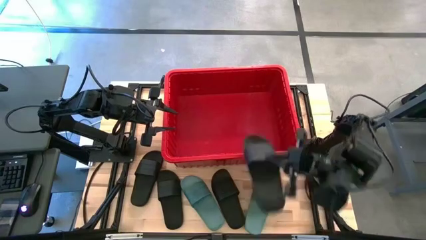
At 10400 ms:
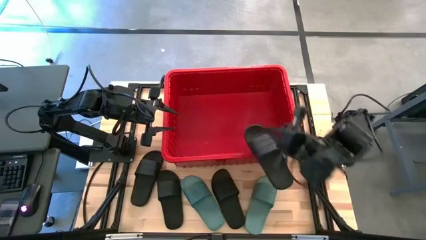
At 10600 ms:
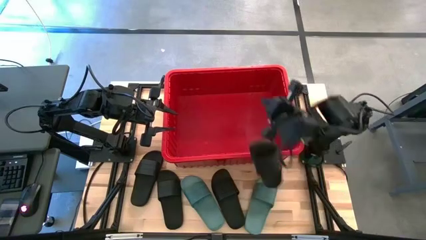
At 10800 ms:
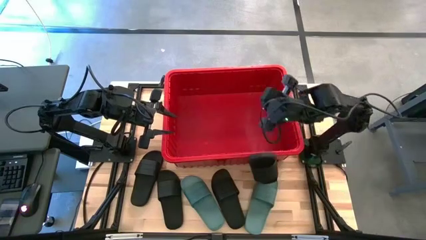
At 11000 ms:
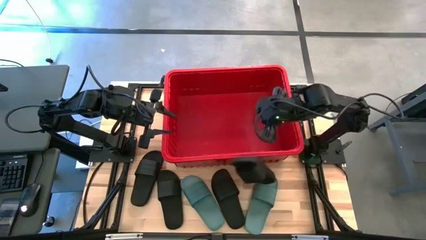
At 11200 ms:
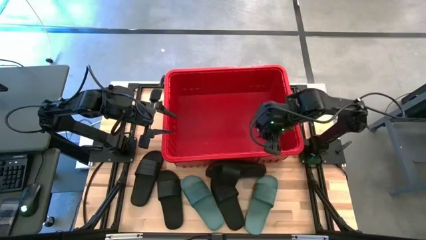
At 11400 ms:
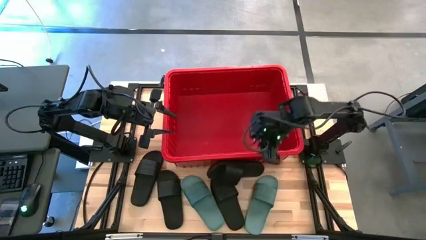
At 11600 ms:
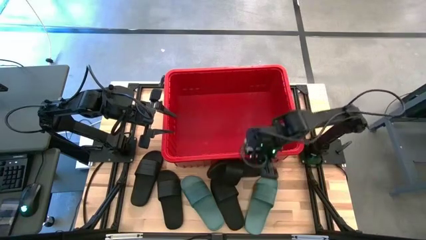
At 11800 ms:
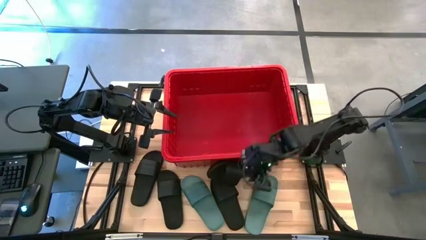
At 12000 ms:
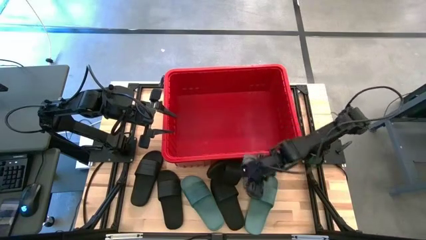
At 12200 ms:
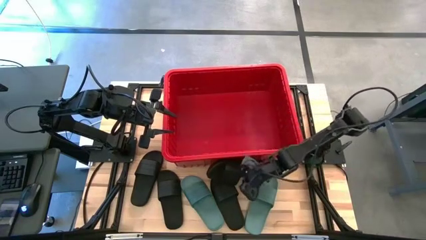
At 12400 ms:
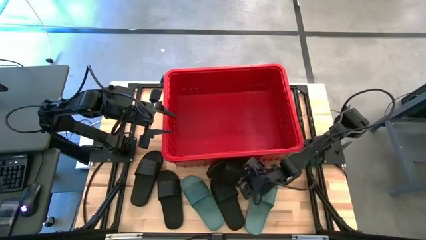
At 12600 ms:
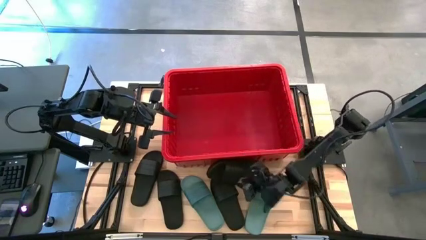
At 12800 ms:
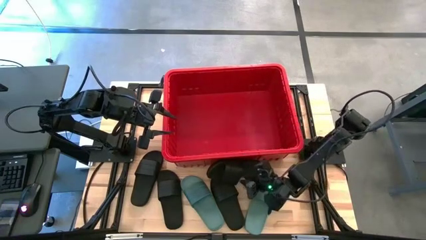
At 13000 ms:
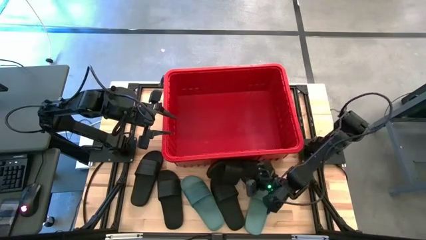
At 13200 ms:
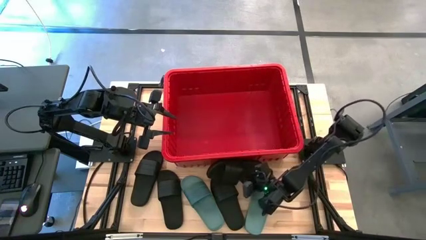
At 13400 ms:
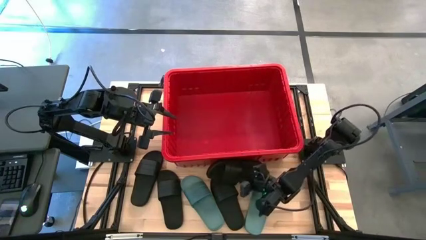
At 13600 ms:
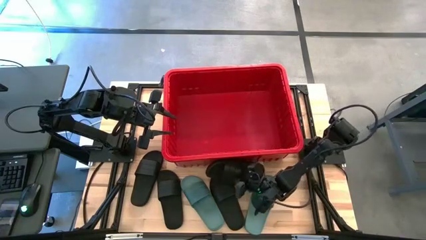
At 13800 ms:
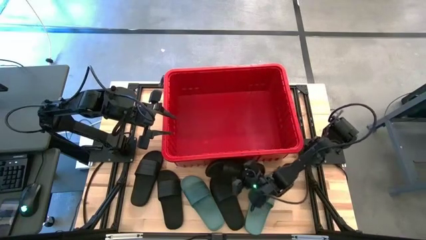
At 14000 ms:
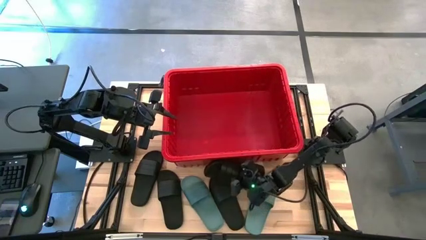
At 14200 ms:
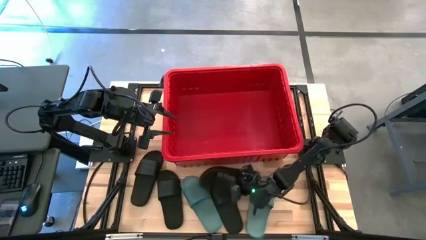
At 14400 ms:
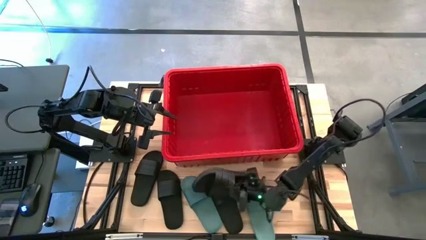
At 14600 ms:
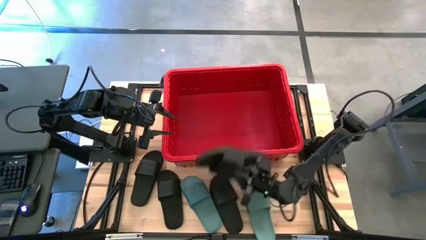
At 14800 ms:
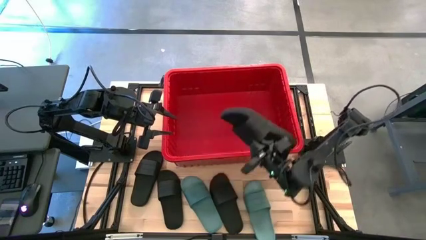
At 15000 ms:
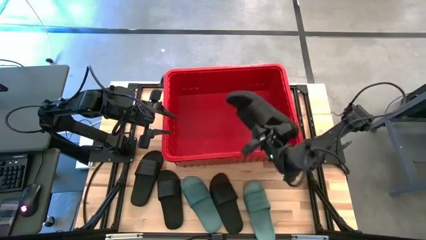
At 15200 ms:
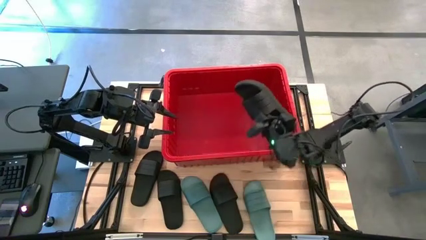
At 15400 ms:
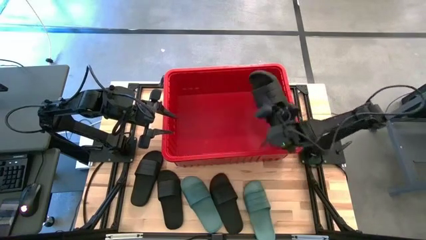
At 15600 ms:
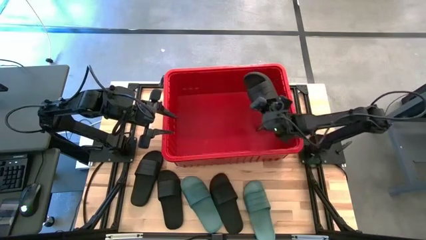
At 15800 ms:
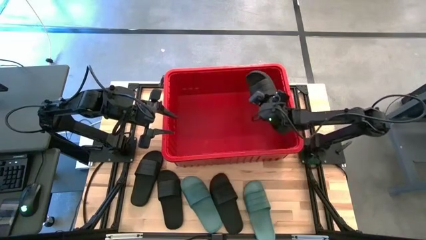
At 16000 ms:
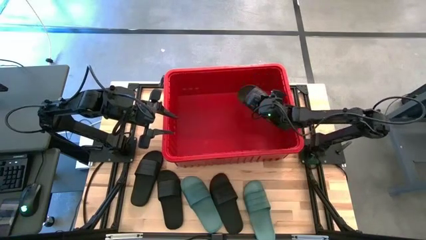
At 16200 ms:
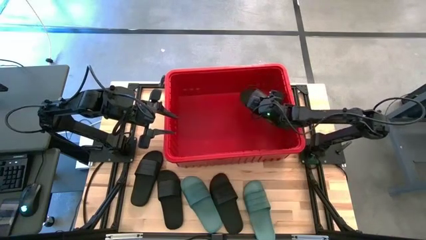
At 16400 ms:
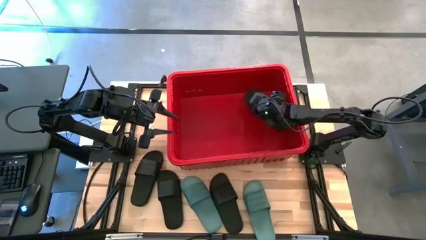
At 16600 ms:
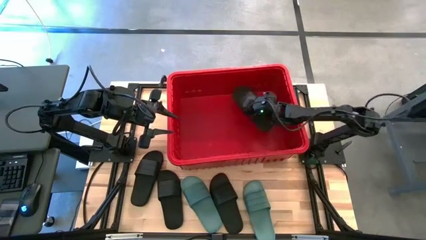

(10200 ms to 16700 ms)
Task: Pick and place slides into bin
Put the black slide into the red bin

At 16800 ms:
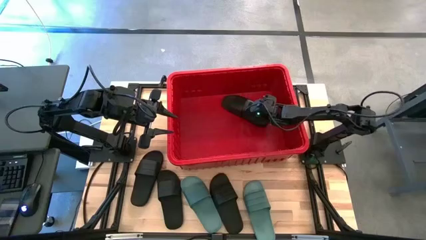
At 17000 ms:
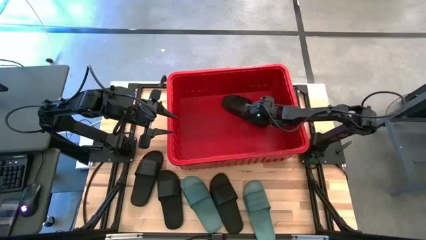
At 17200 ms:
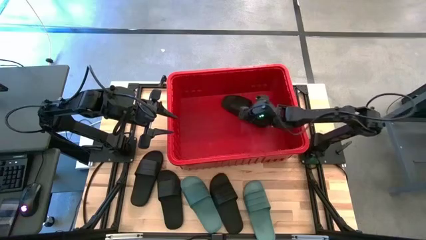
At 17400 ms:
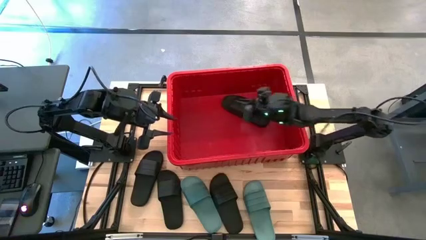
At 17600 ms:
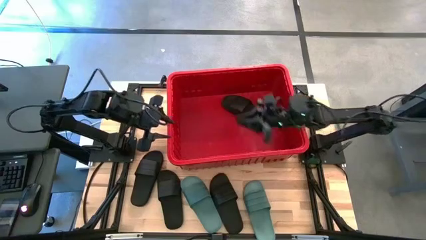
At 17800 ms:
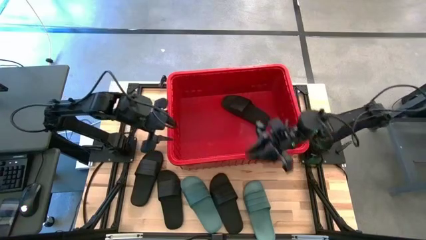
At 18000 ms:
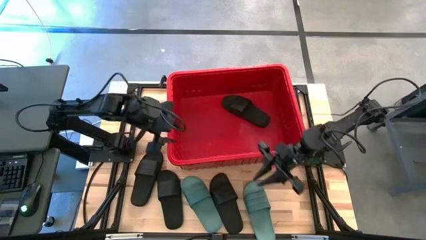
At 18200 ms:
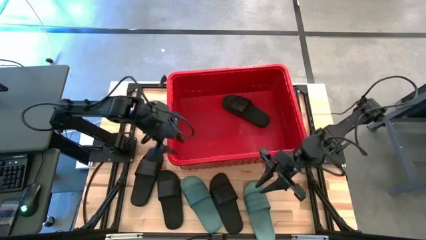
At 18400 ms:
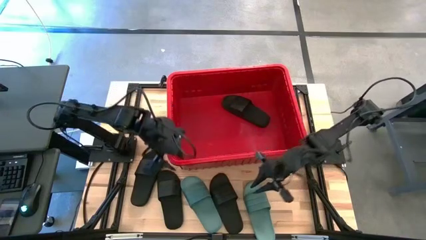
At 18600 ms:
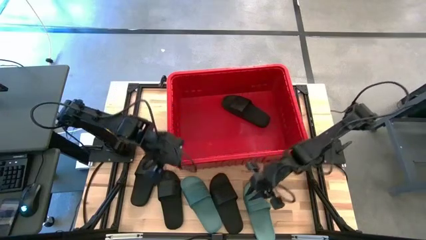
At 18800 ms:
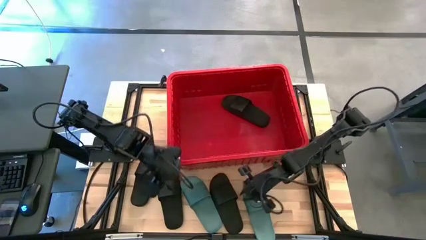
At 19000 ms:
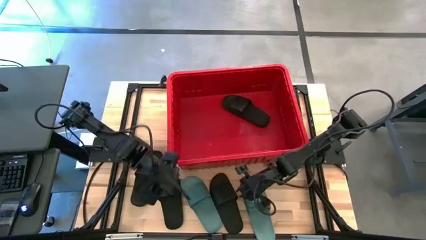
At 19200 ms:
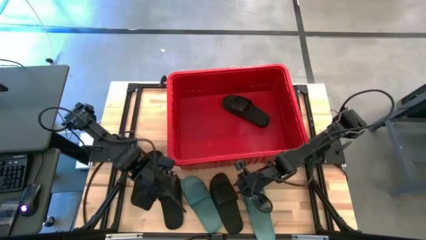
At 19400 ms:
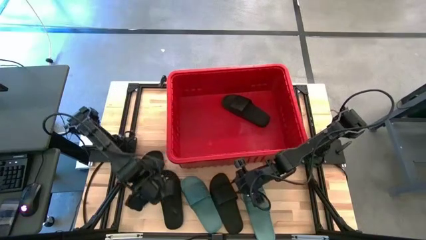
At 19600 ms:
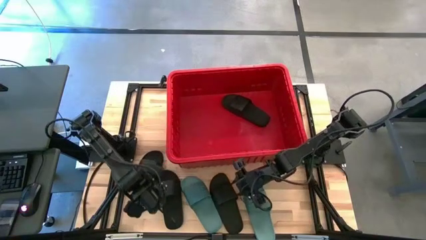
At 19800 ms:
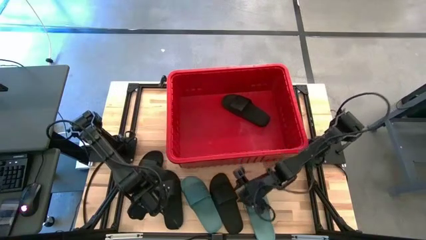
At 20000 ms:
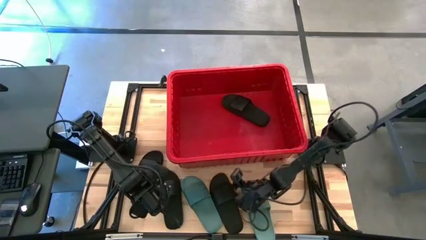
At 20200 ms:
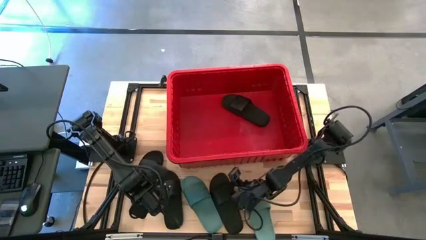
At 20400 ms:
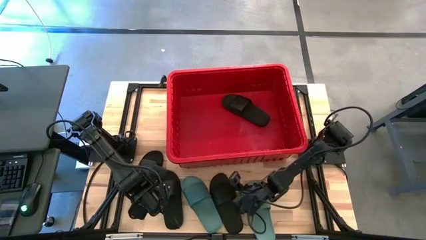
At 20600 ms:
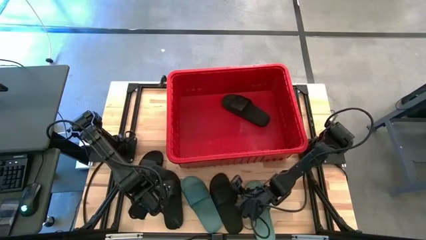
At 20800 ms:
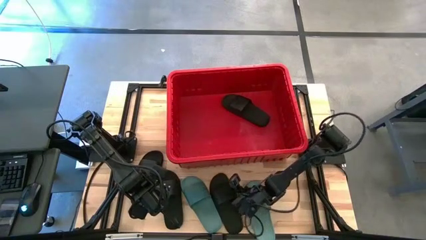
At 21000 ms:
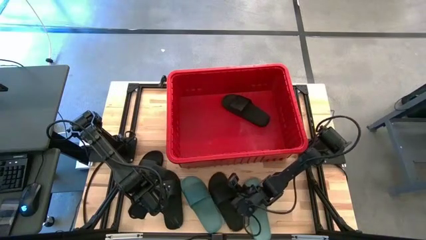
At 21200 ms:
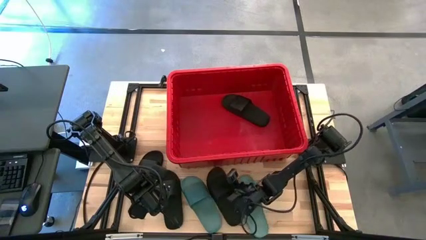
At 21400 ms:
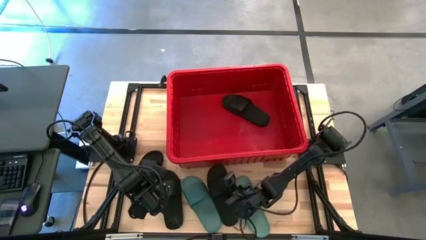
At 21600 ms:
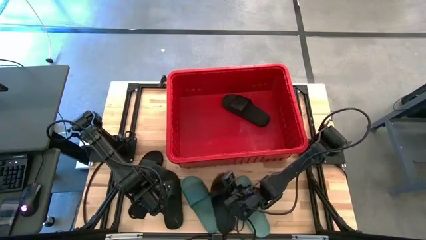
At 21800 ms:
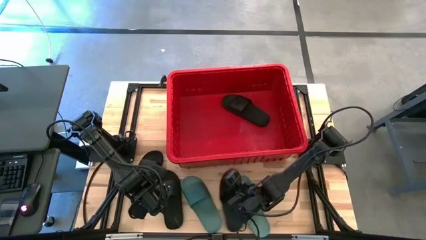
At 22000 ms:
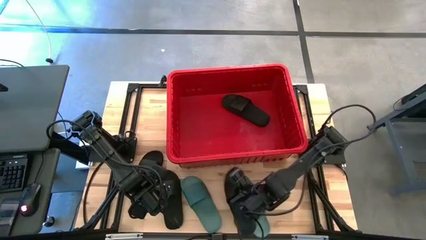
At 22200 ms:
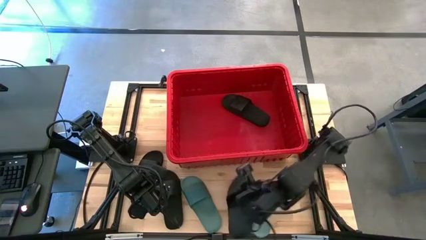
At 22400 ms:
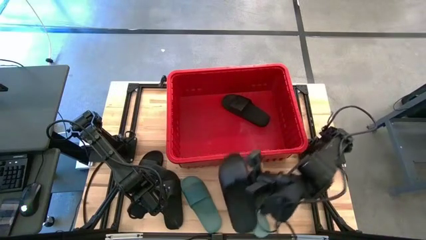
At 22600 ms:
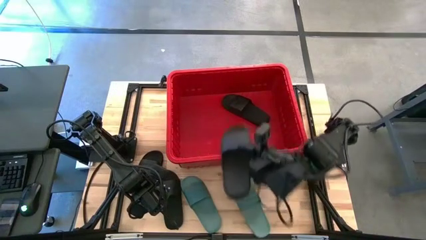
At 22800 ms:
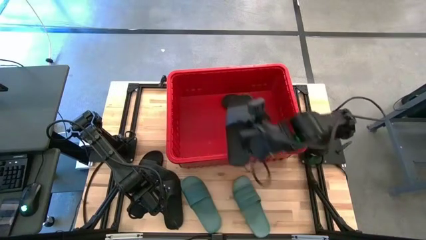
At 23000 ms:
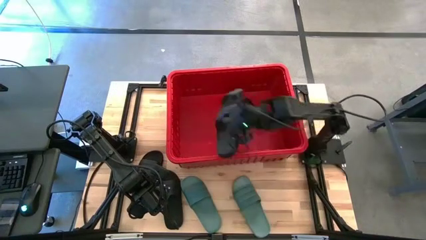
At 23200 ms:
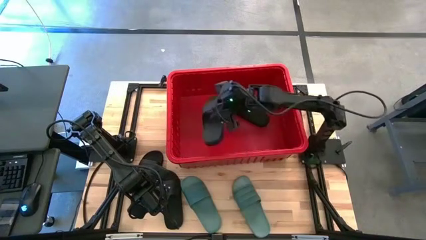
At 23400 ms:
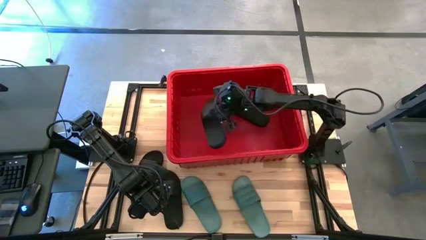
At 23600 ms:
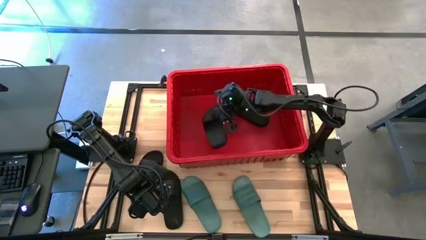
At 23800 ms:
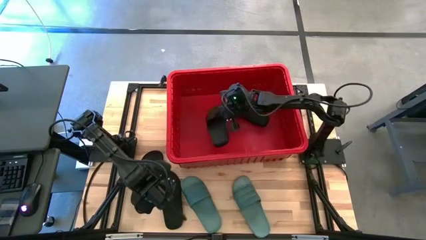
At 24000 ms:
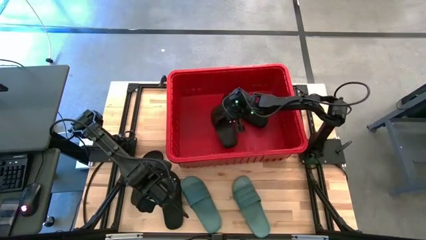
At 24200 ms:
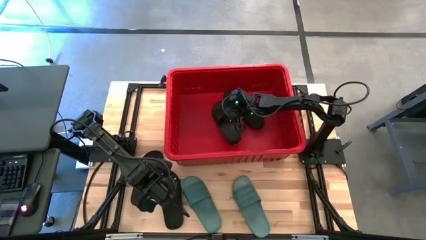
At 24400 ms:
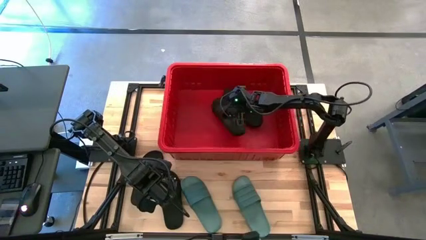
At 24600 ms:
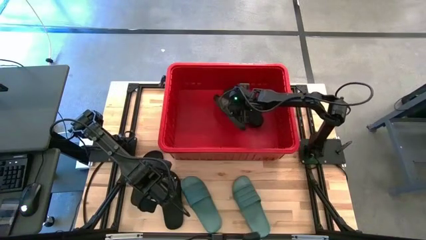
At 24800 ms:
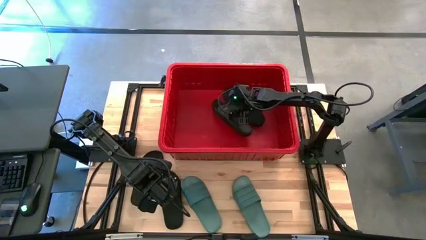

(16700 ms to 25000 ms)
Put the black slide into the red bin

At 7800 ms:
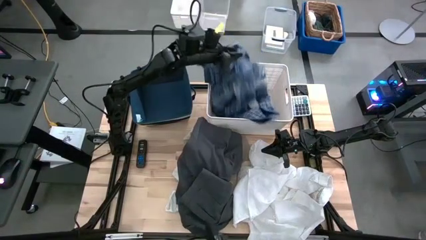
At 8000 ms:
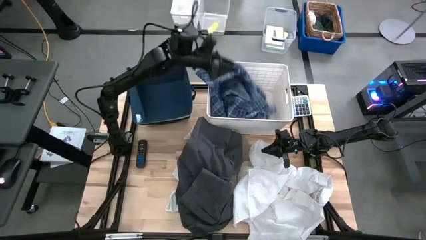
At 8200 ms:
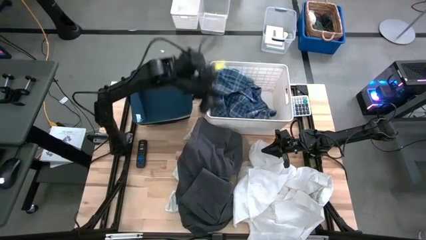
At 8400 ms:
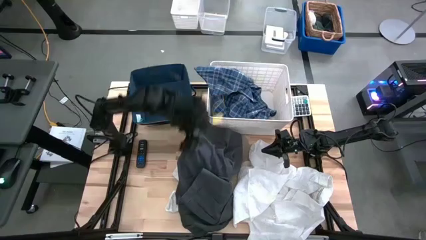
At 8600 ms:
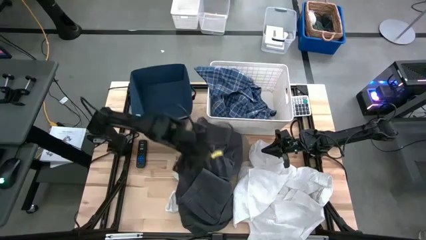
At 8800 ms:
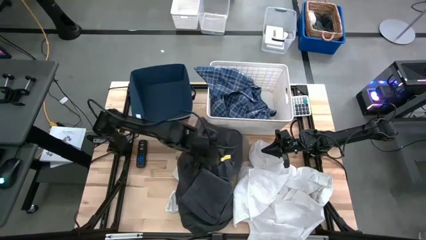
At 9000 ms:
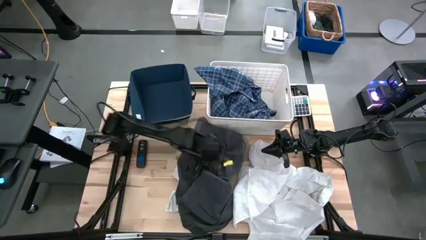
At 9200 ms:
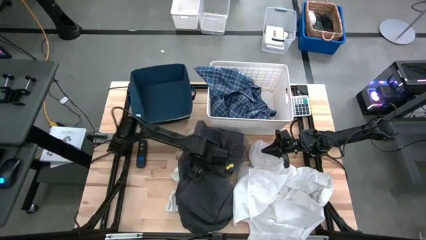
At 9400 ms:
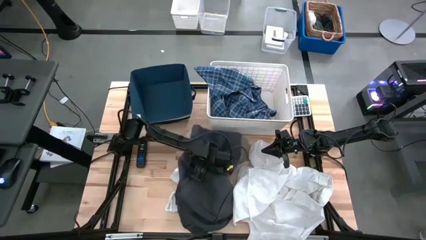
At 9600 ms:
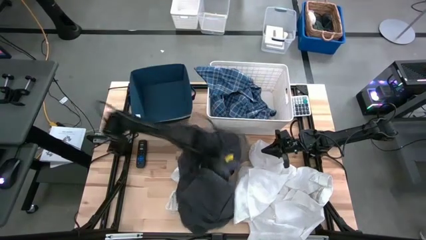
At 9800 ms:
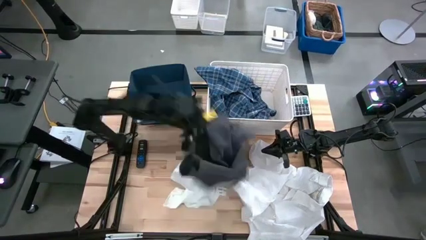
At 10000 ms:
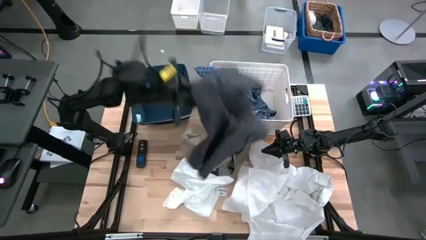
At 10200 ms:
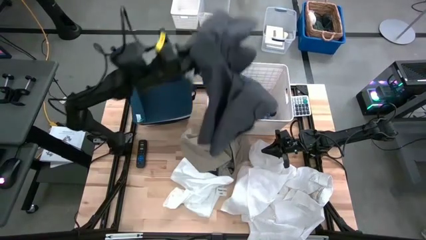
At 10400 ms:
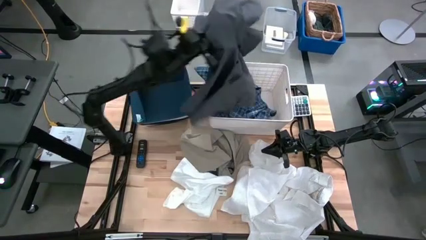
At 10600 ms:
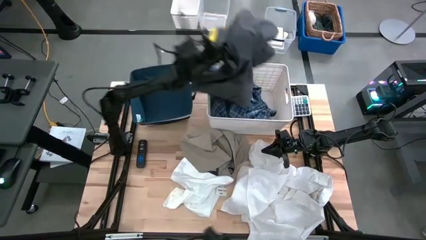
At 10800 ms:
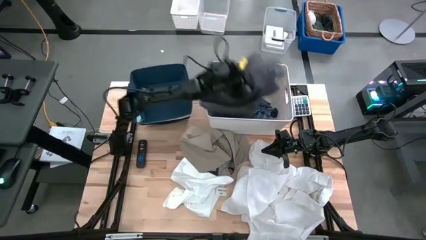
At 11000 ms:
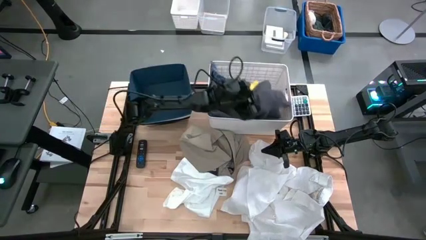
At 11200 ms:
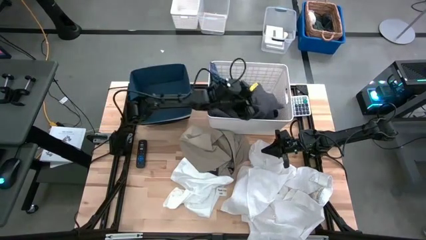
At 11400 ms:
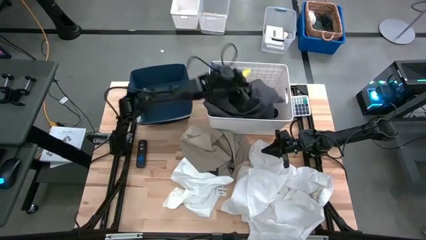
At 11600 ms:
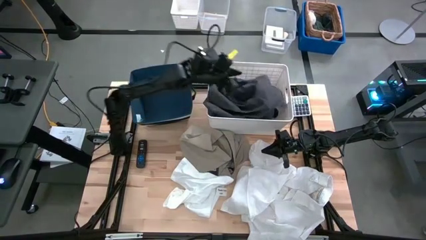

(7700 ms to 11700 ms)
Task: Sort clothes
Put the gray short into the white bin
